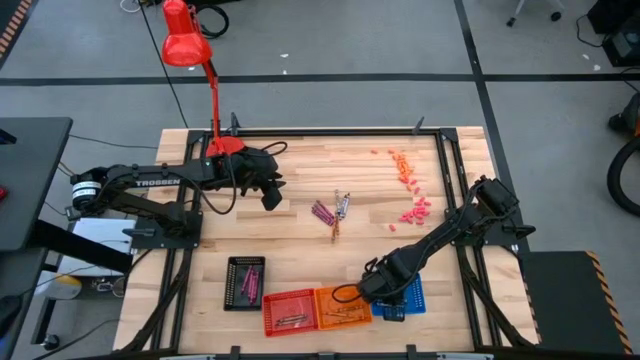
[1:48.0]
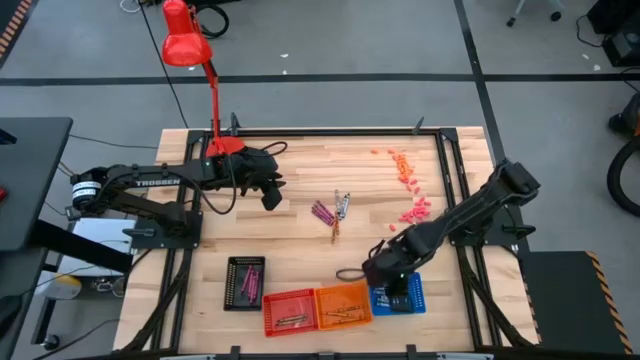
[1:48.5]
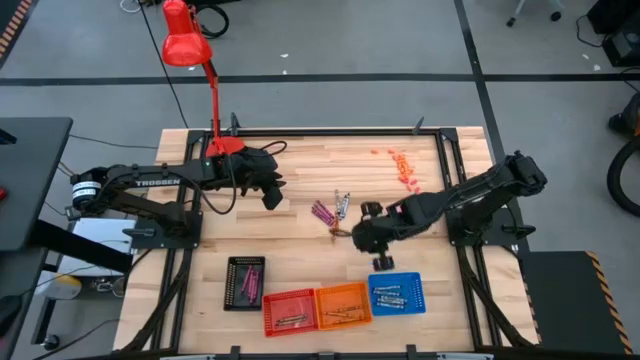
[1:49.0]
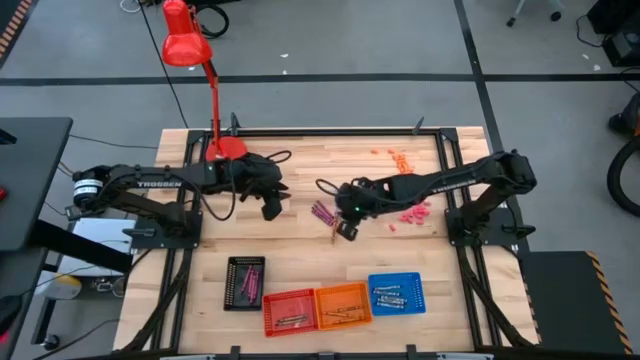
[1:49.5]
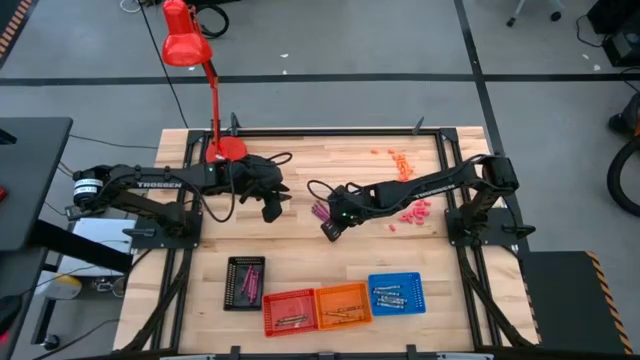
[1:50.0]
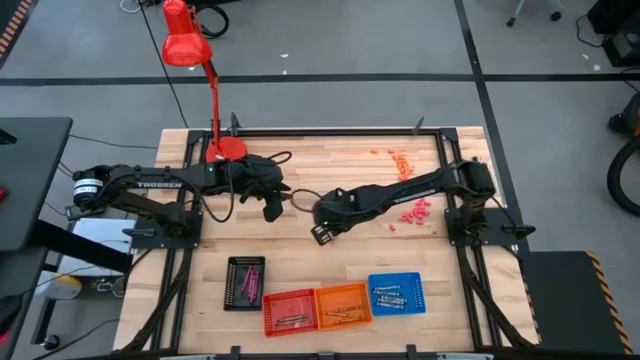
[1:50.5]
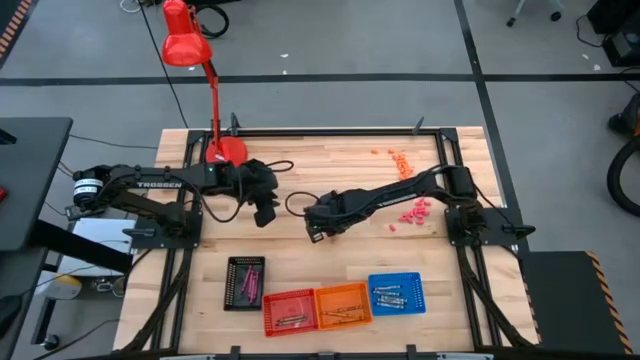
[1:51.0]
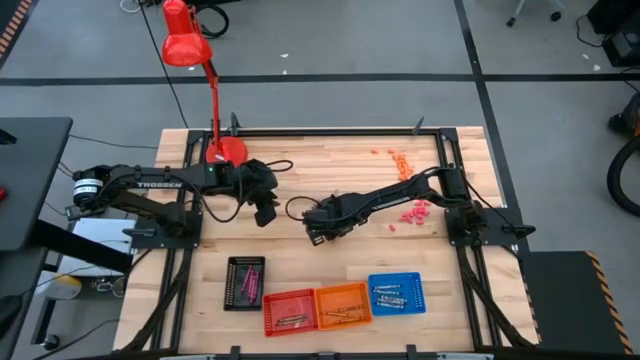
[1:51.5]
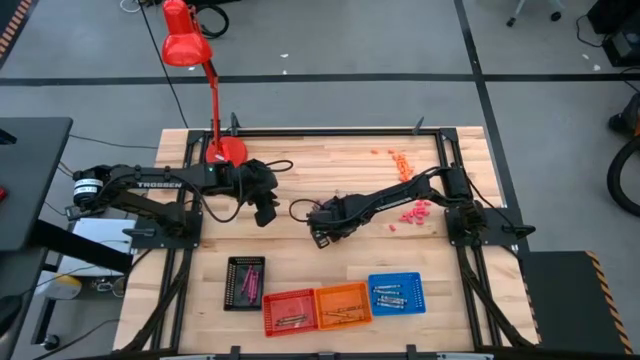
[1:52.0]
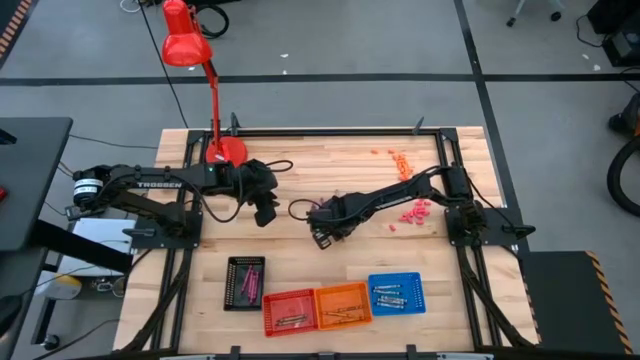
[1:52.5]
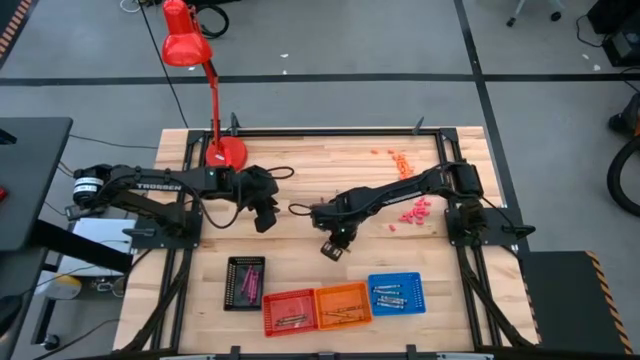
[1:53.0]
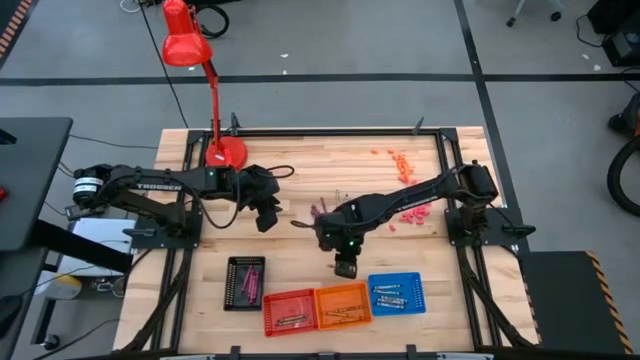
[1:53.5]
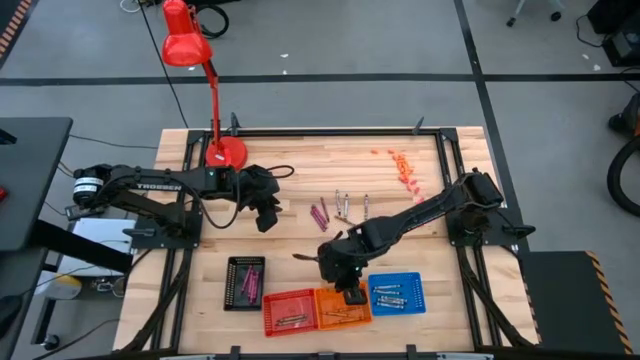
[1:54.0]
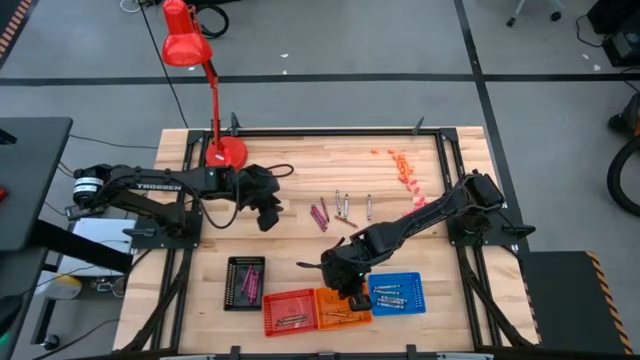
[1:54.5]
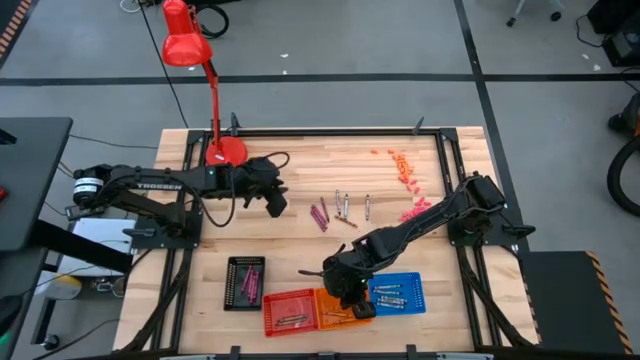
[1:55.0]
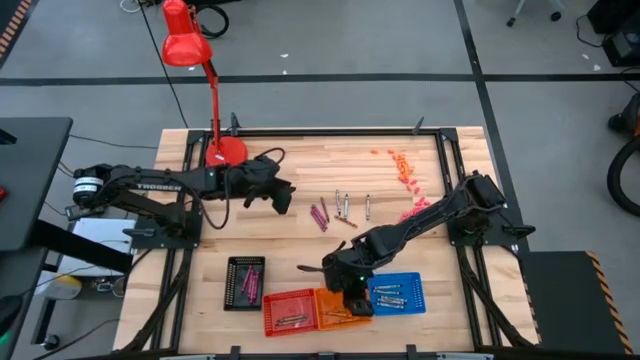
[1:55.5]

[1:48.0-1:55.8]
Task: Sort crayons
Put the orange crayon into the orange bin

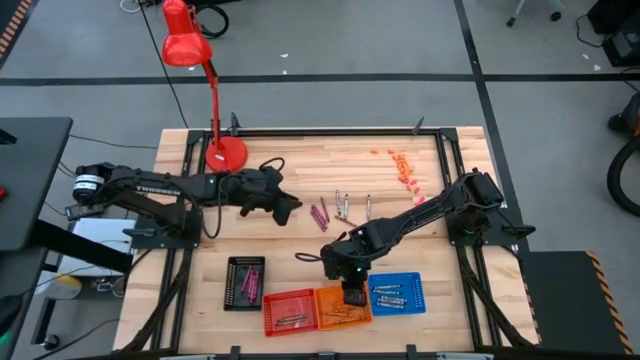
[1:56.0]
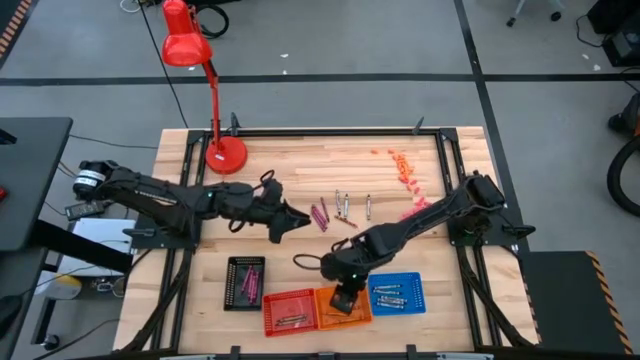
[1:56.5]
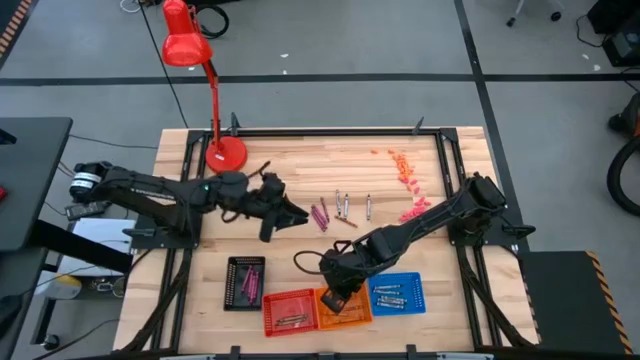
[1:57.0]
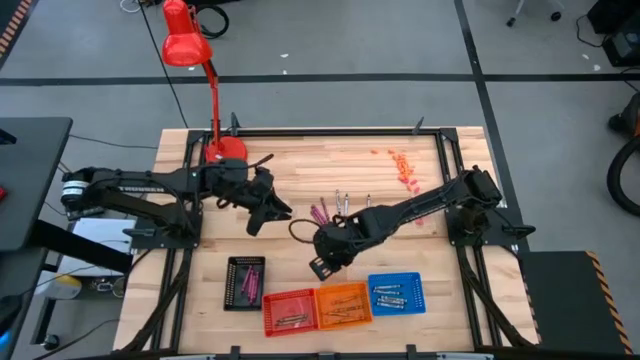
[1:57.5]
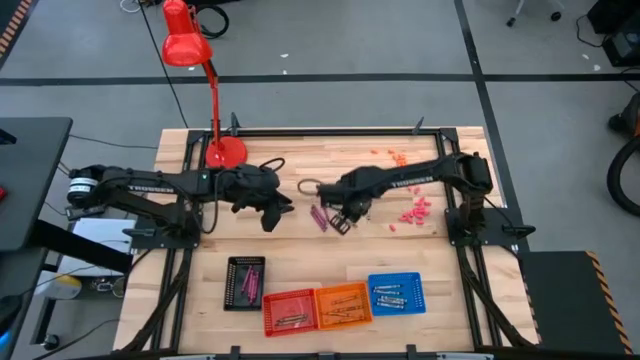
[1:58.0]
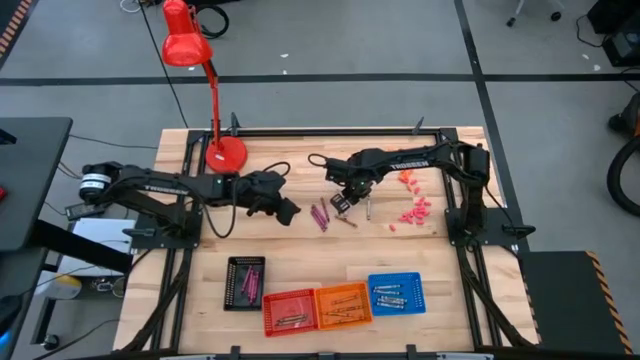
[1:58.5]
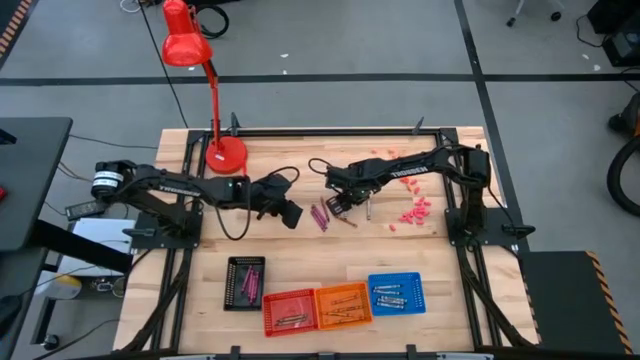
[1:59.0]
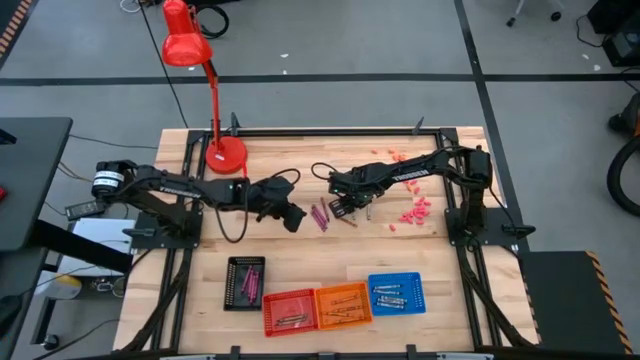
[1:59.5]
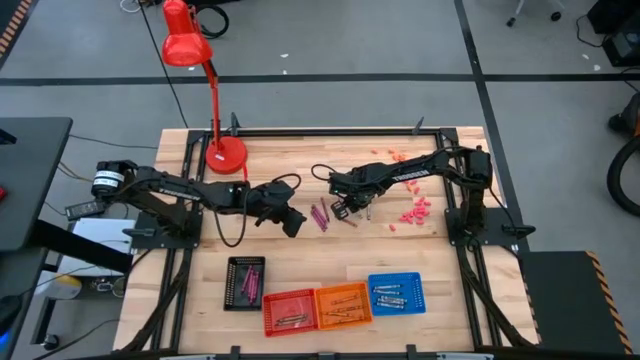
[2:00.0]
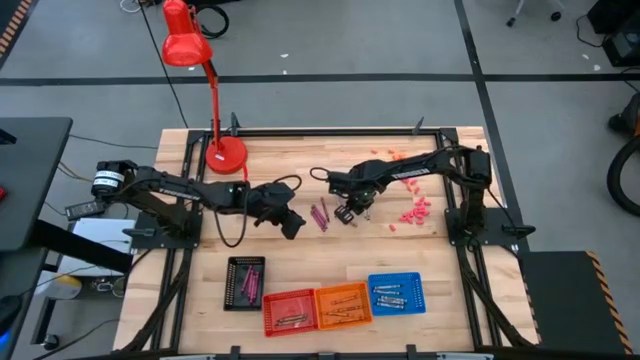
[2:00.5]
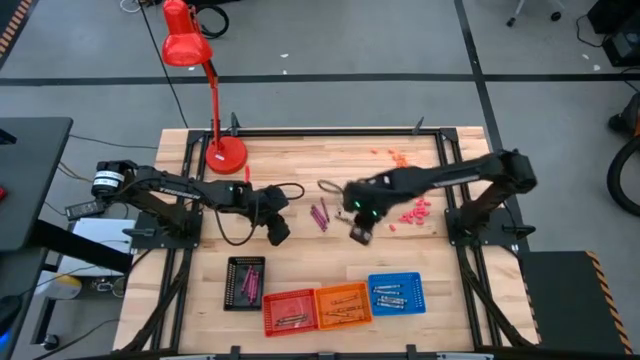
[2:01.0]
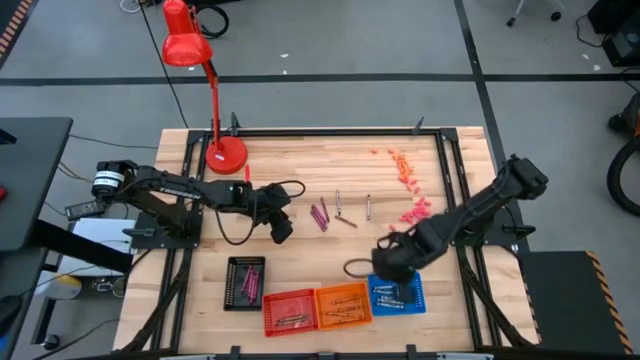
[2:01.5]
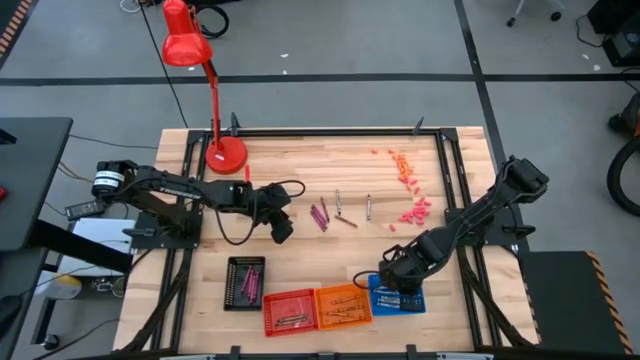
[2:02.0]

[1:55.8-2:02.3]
Put the black crayon into the blue bin

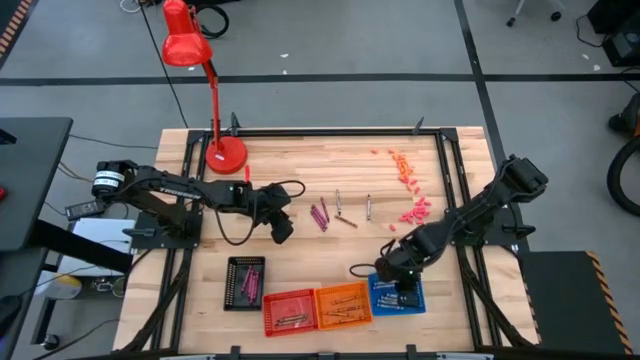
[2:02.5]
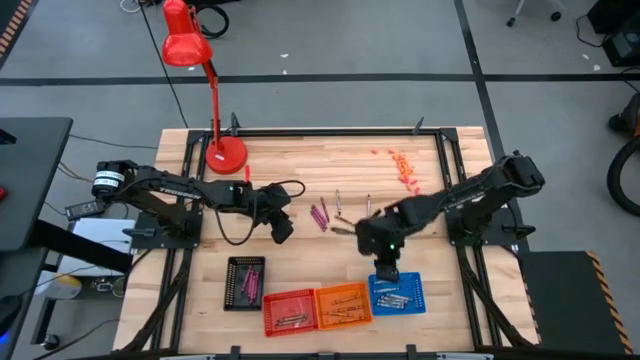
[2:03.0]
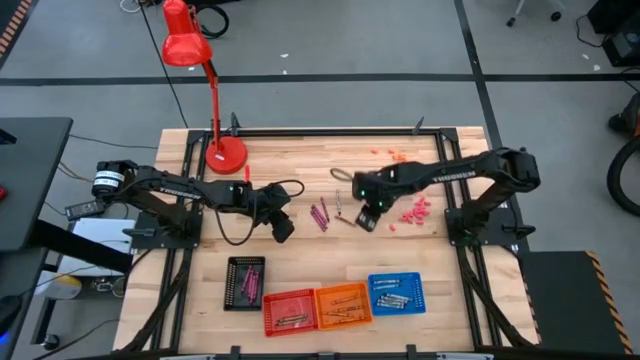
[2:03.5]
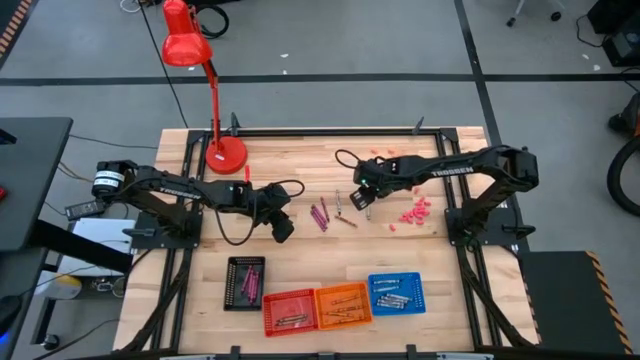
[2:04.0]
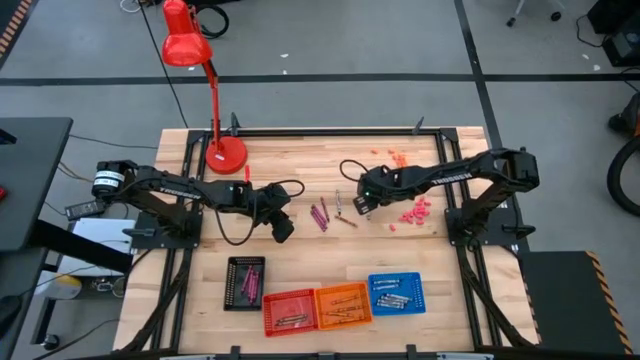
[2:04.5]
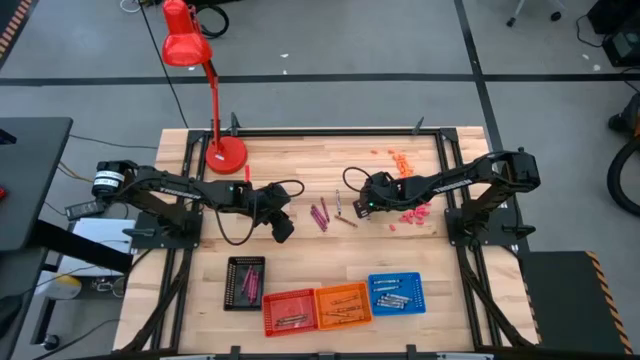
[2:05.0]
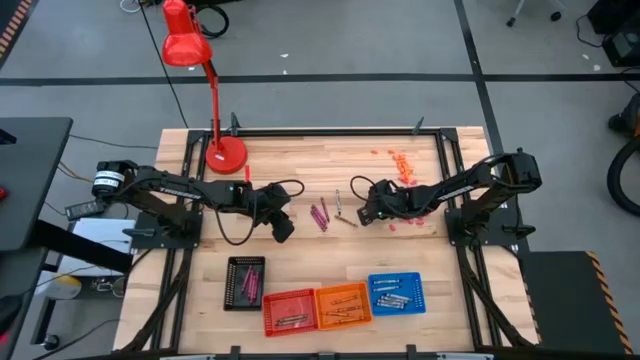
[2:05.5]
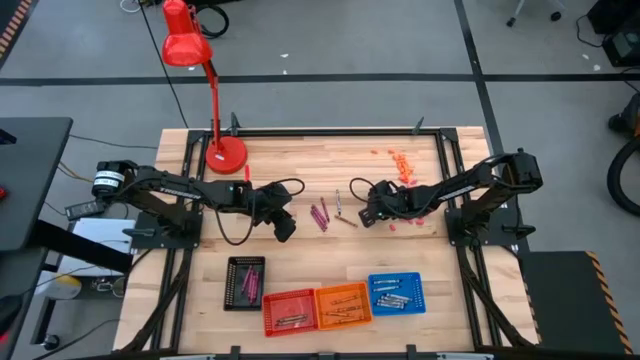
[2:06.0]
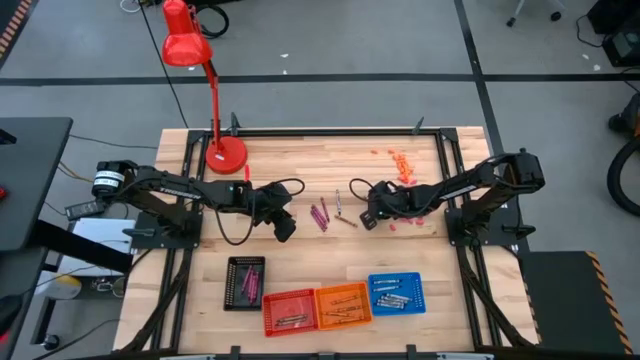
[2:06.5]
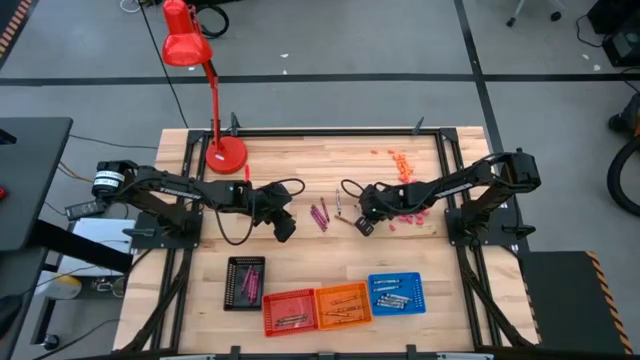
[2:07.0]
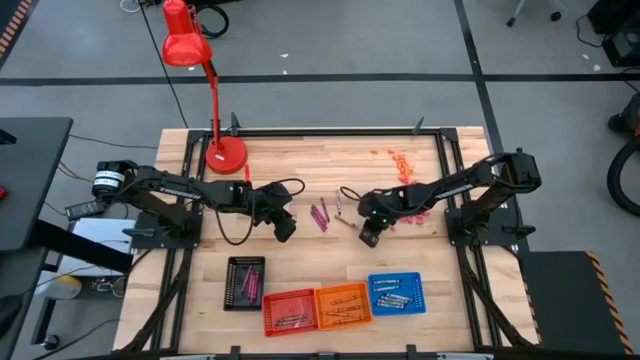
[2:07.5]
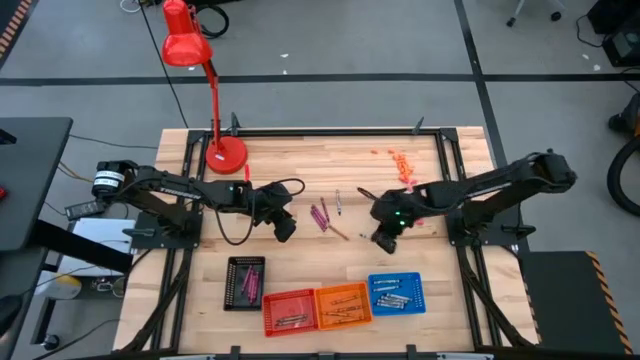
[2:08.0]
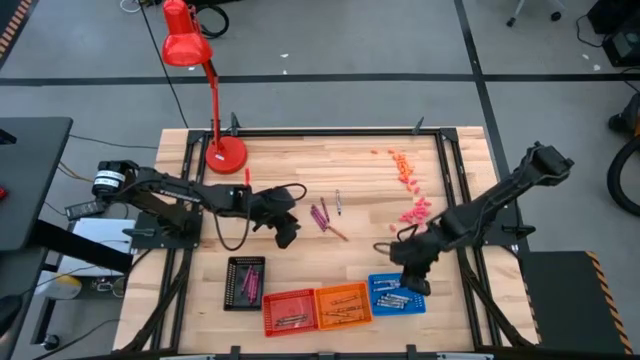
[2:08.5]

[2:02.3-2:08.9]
Put the black crayon into the blue bin
